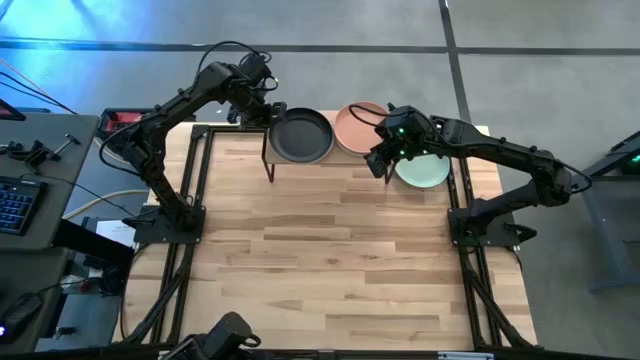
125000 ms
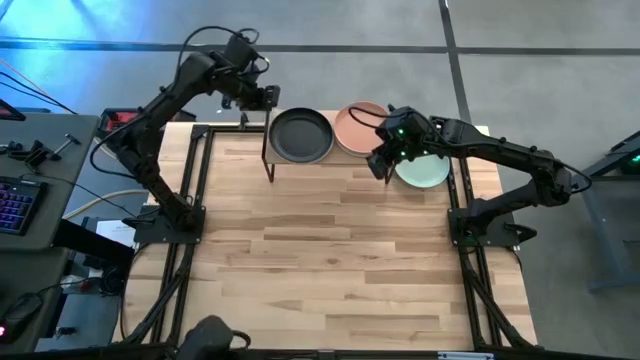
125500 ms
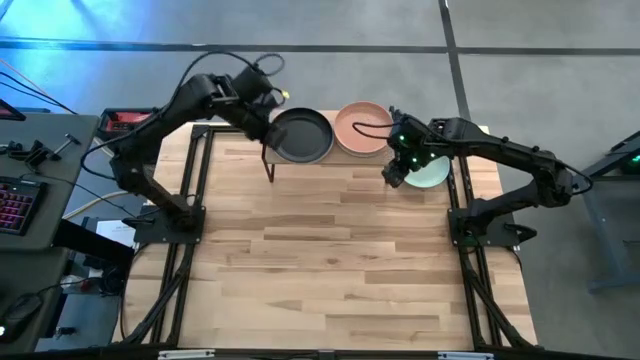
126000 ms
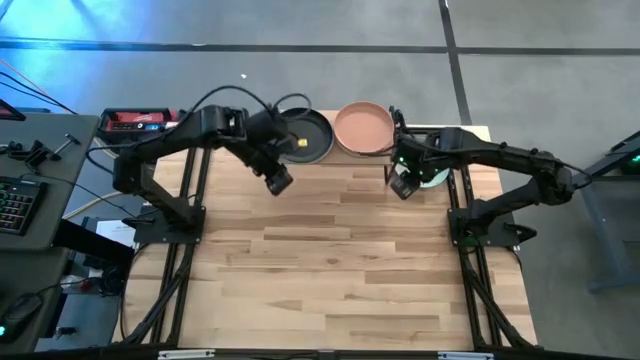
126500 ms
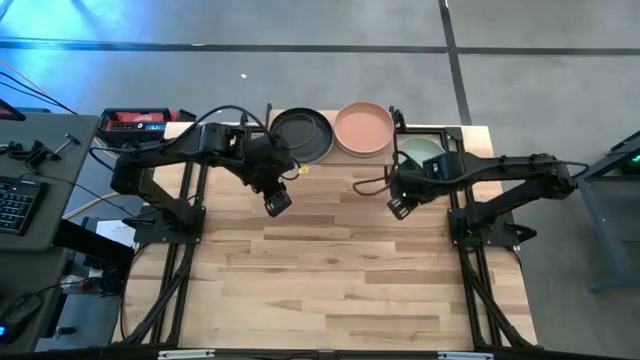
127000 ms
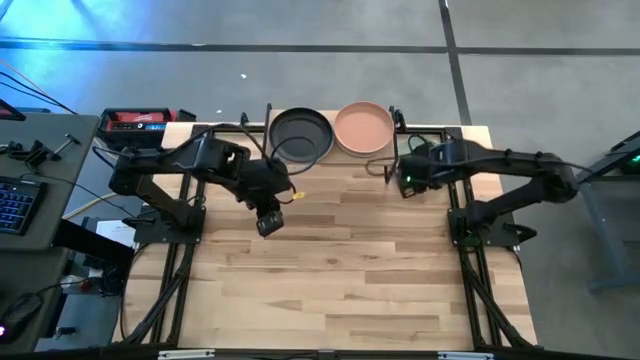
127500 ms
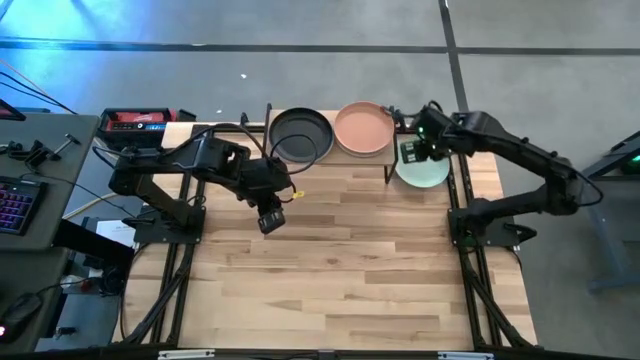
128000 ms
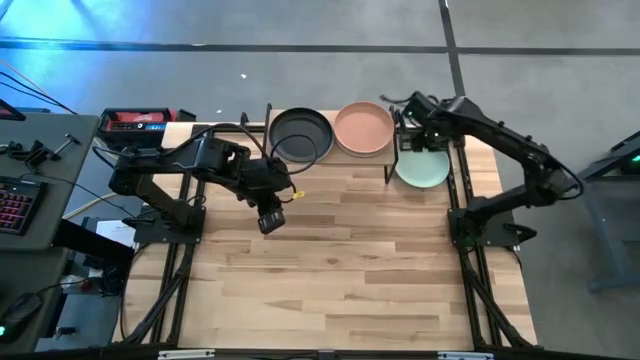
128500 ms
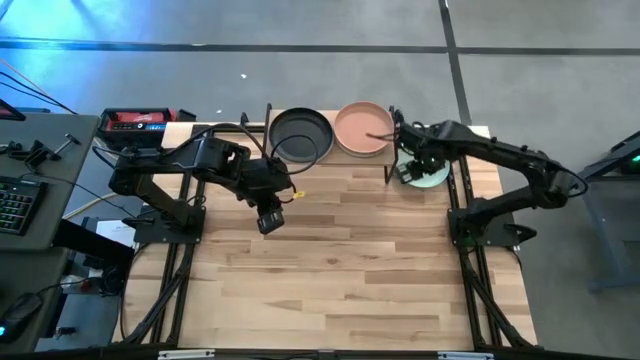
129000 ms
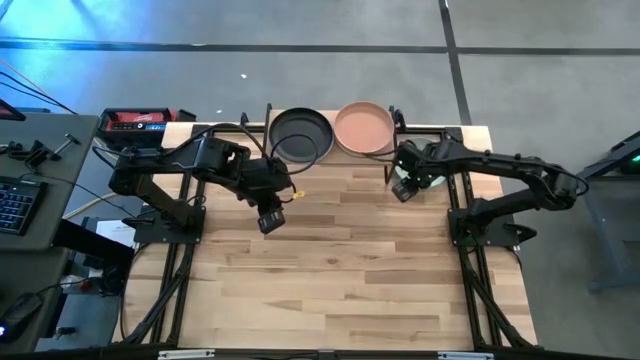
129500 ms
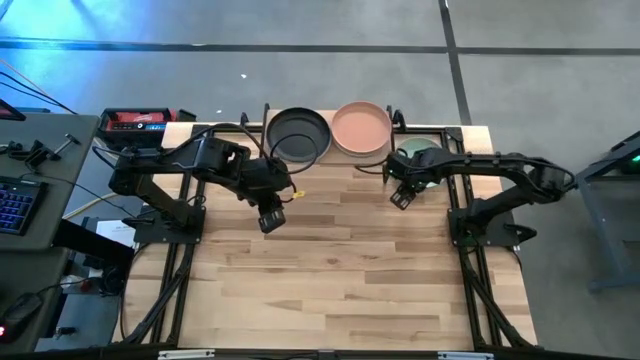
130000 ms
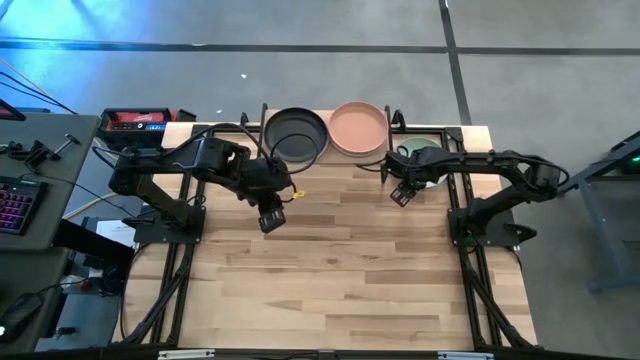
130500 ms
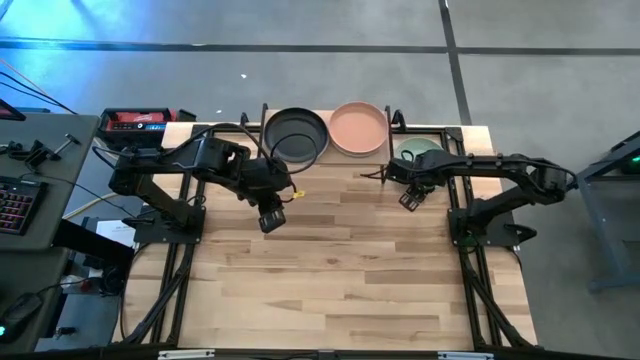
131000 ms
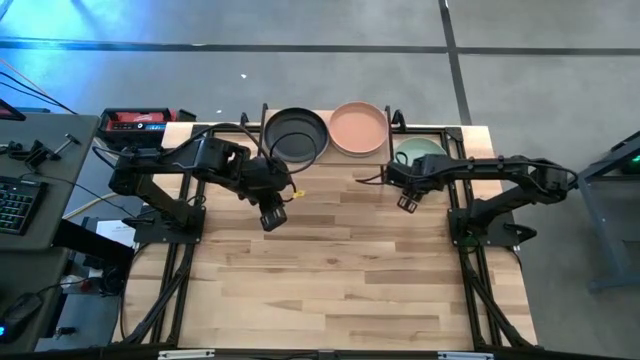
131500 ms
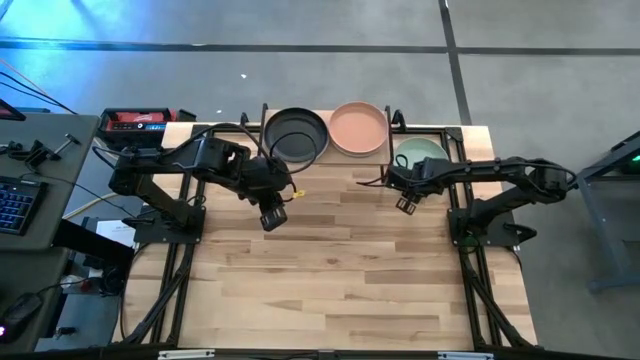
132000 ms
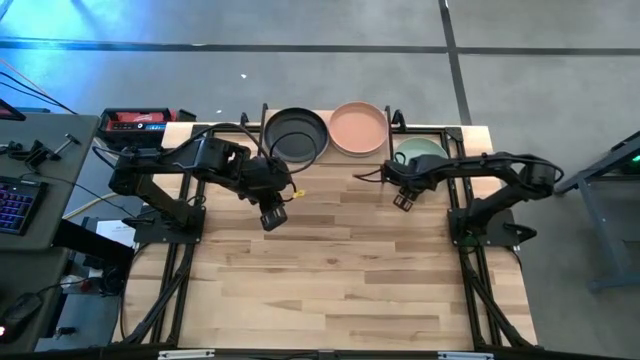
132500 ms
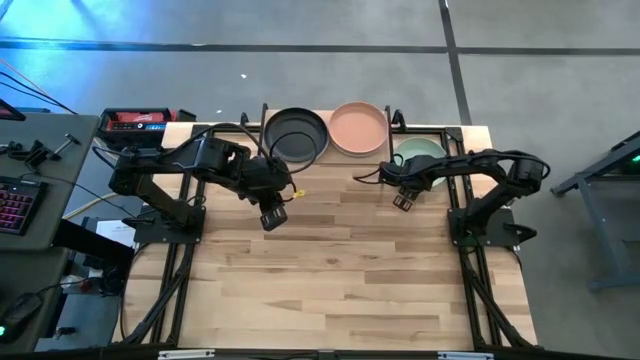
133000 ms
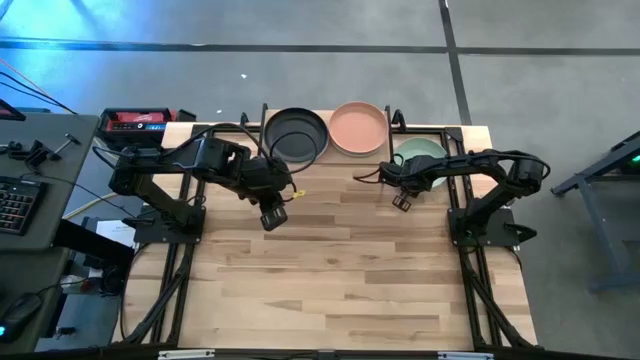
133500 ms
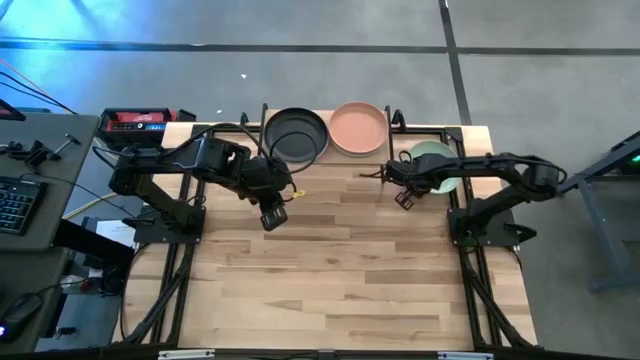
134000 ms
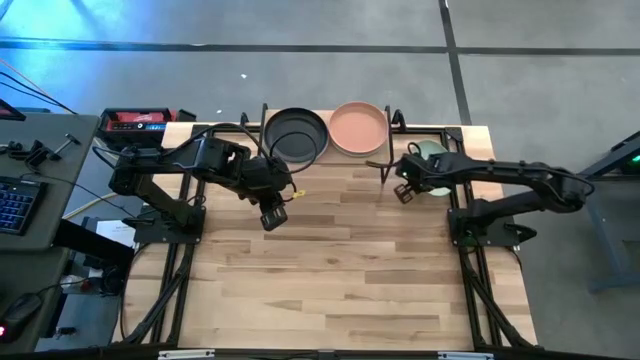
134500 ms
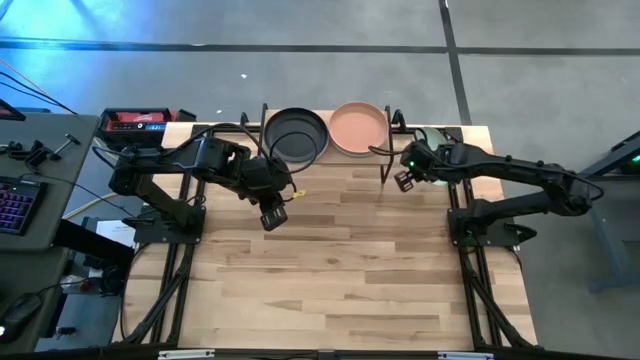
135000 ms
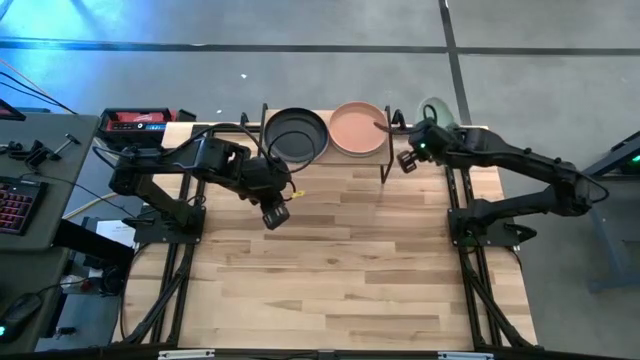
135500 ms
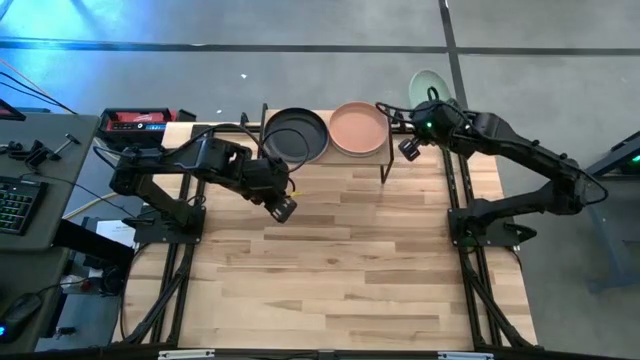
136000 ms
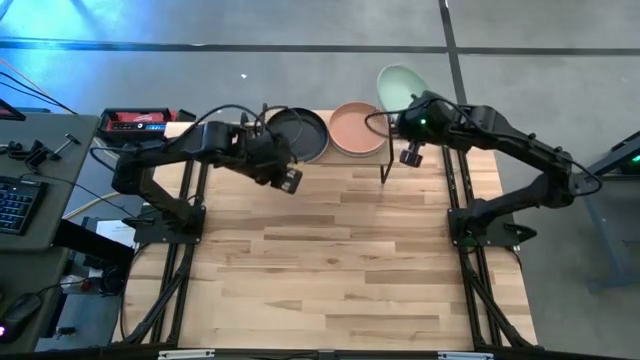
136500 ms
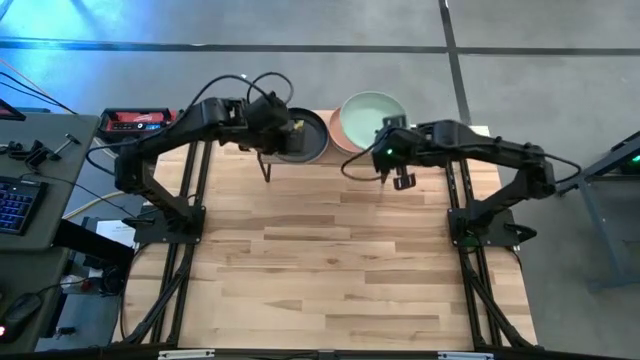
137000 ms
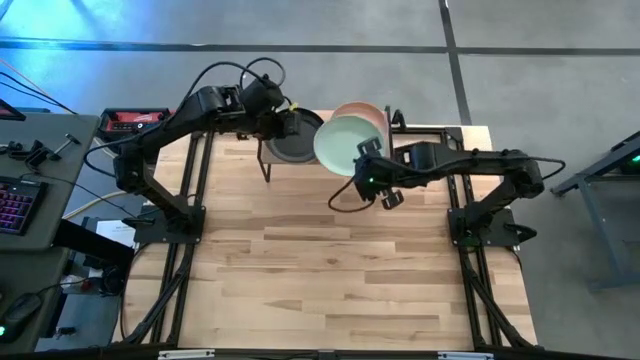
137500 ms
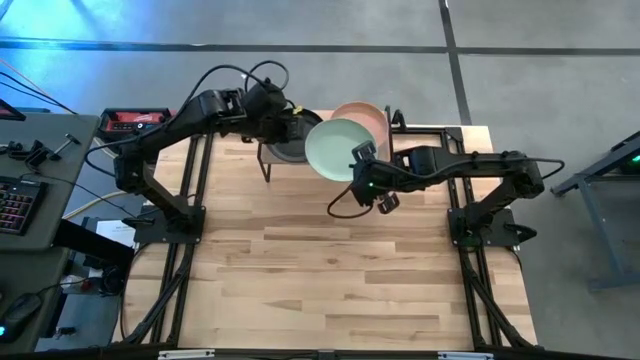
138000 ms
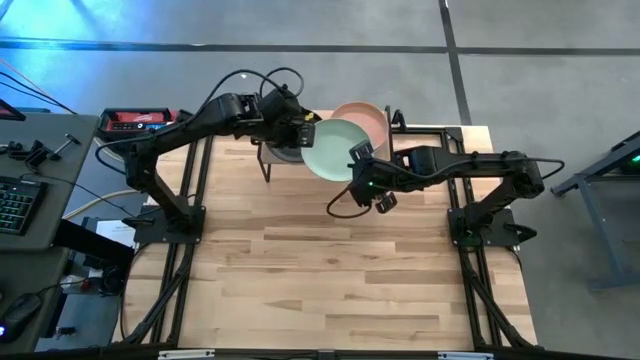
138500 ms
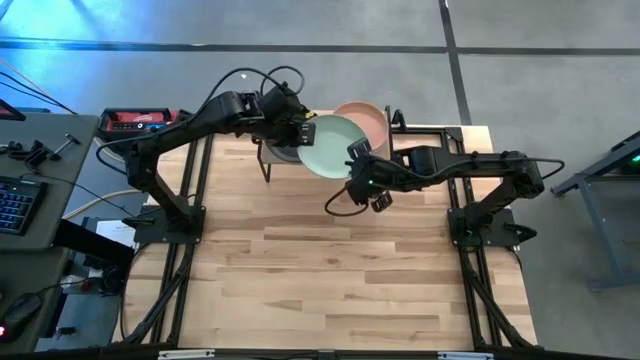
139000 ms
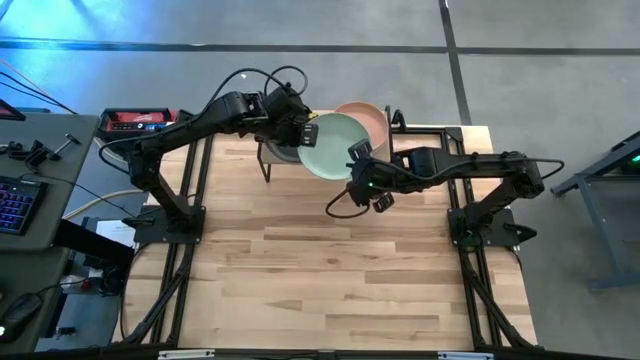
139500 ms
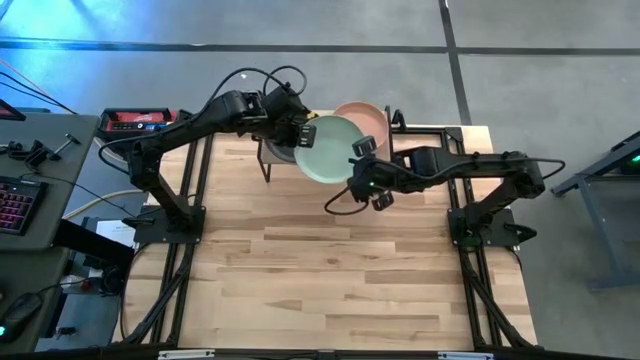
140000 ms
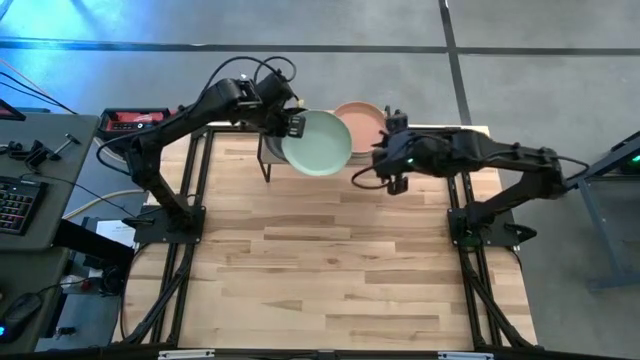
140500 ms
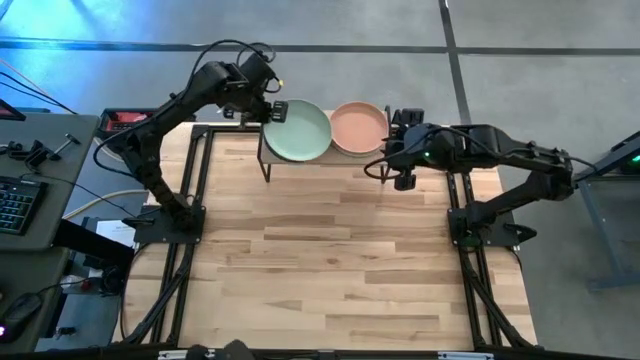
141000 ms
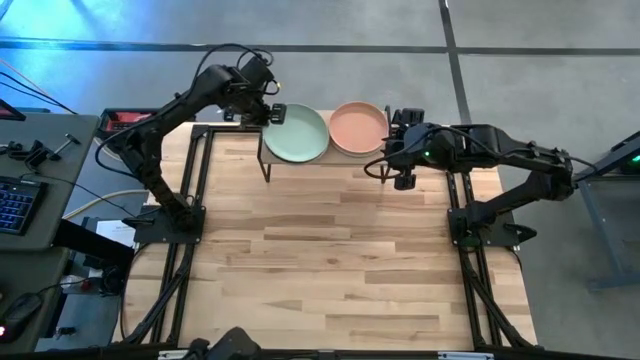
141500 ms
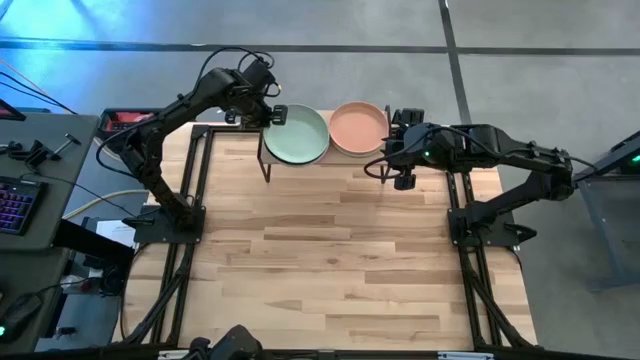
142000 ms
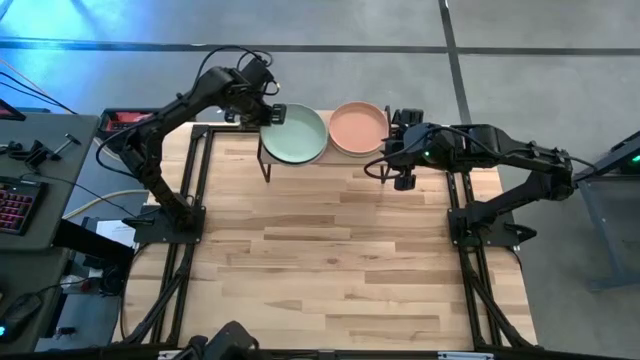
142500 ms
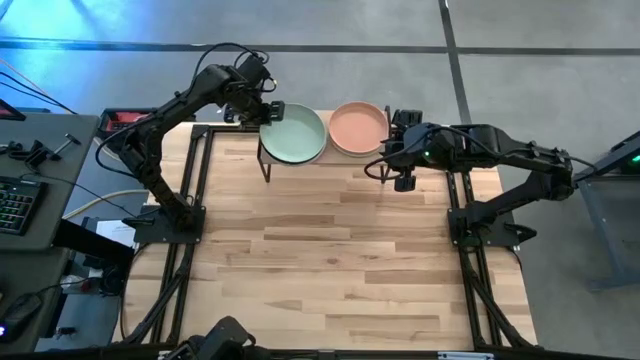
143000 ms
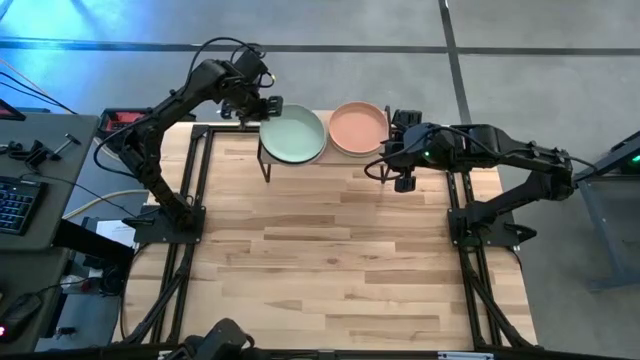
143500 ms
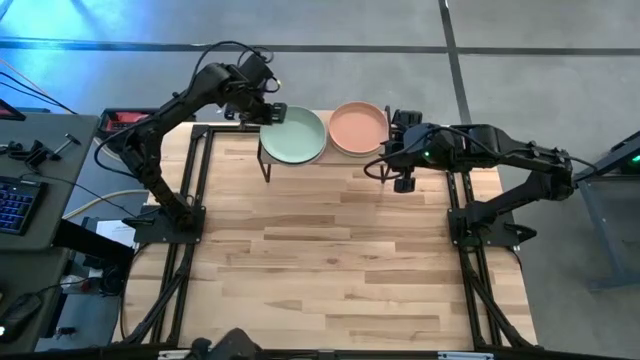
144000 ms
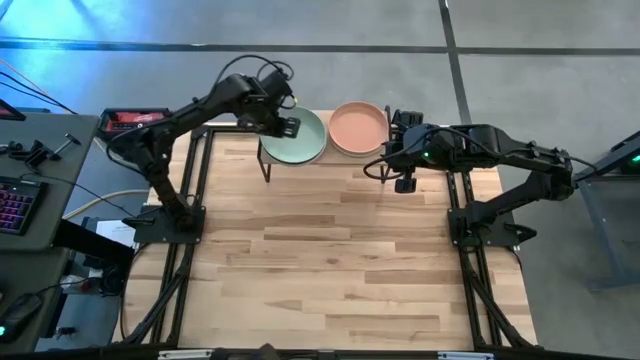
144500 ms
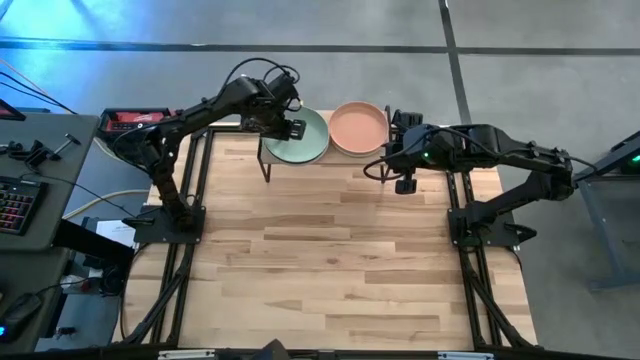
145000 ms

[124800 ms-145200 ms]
Task: Place and stack plates onto a shelf
Stack the green plate on top of the other black plate on the shelf

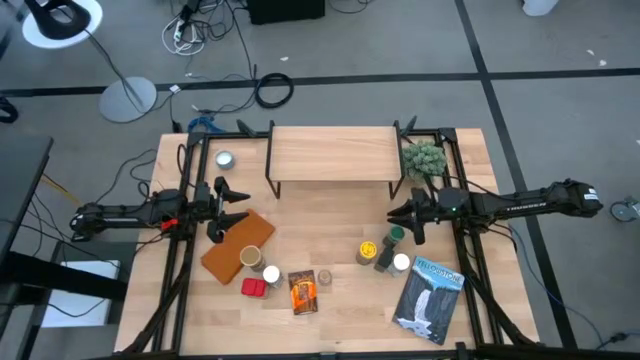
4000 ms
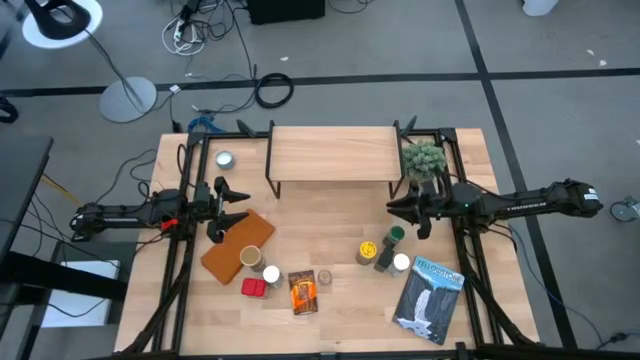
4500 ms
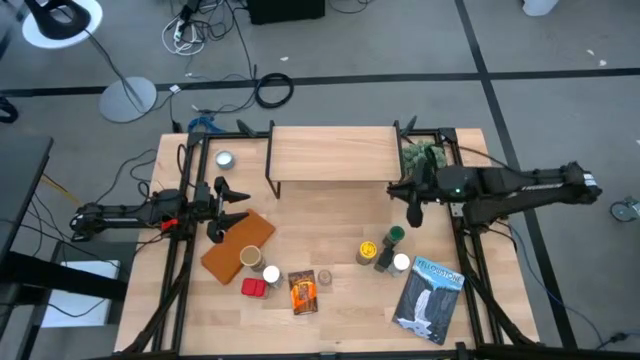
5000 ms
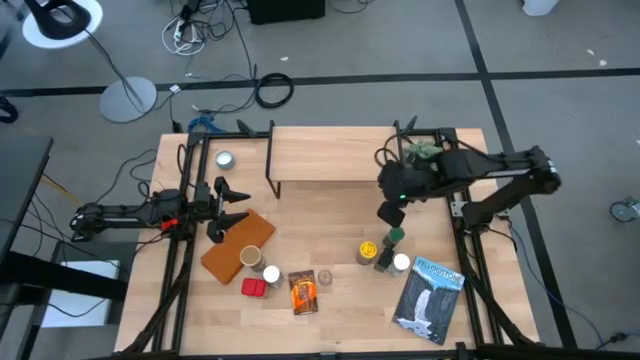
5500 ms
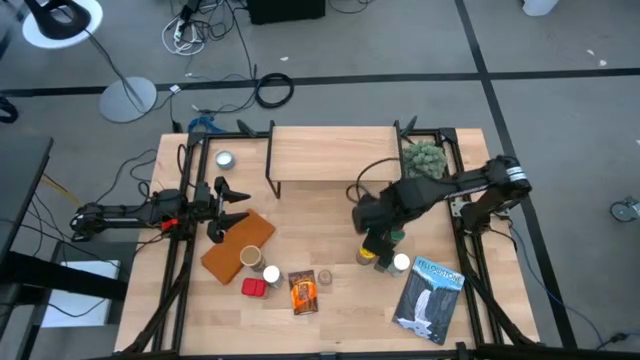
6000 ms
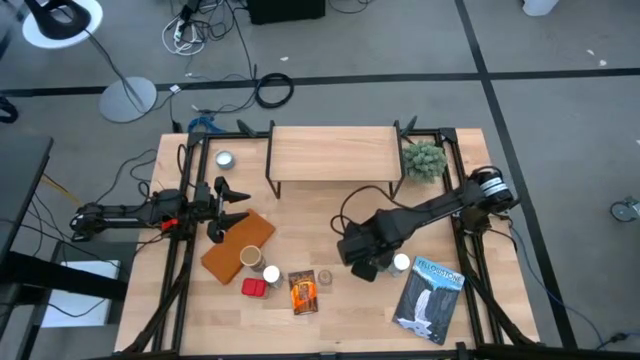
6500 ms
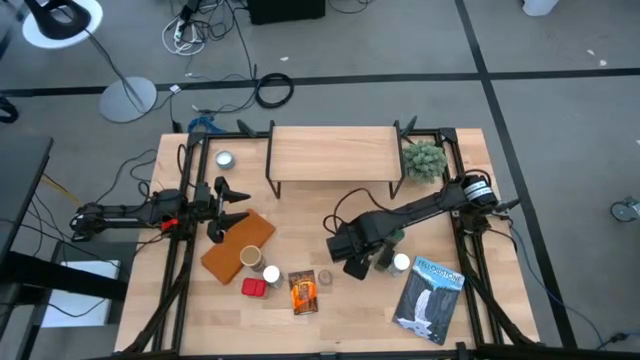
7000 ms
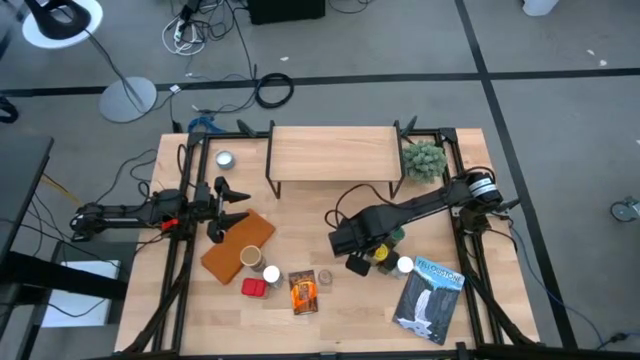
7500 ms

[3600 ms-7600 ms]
Task: Shelf spices
Put the yellow seasoning bottle on the shelf
